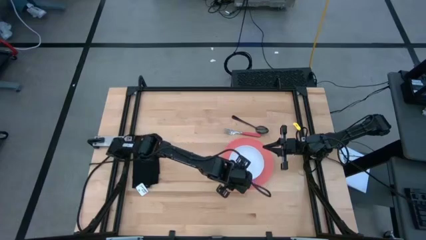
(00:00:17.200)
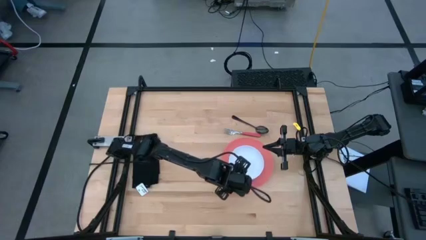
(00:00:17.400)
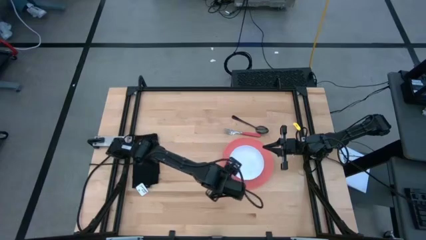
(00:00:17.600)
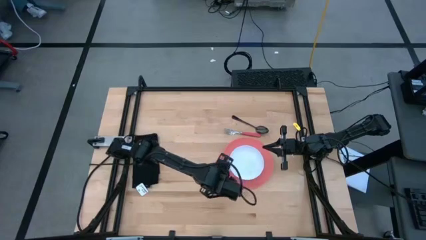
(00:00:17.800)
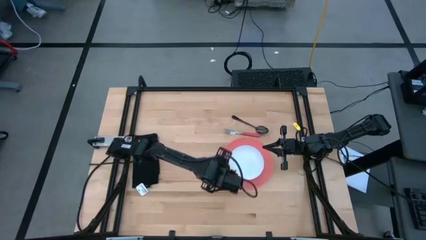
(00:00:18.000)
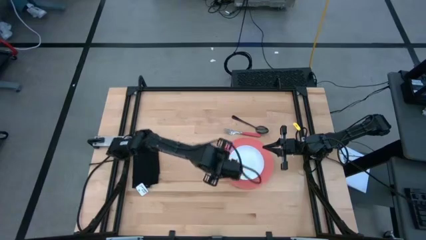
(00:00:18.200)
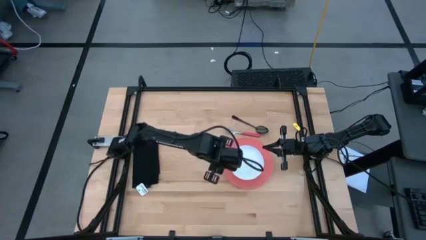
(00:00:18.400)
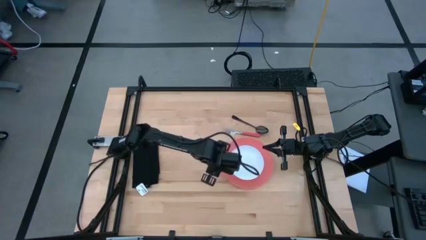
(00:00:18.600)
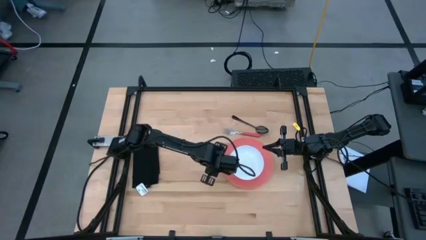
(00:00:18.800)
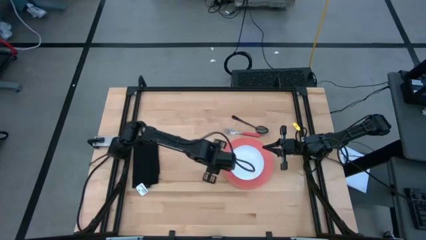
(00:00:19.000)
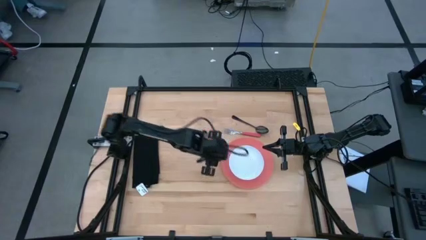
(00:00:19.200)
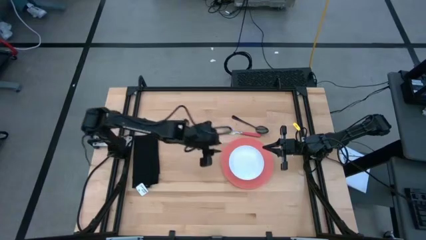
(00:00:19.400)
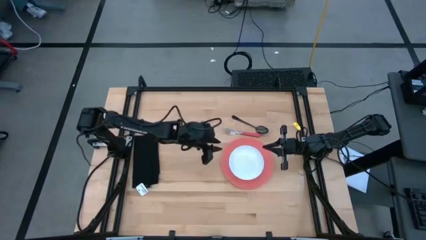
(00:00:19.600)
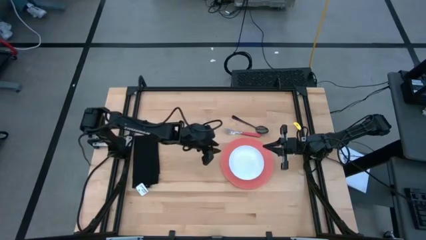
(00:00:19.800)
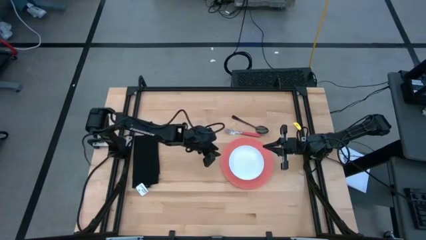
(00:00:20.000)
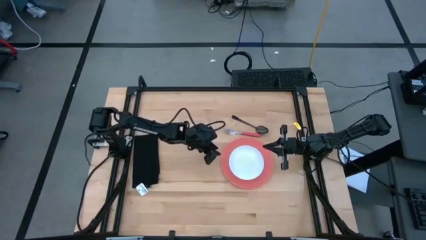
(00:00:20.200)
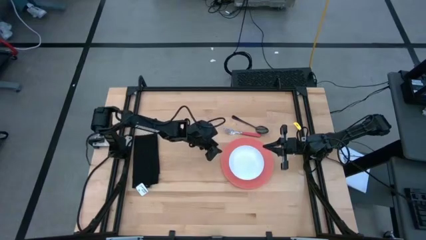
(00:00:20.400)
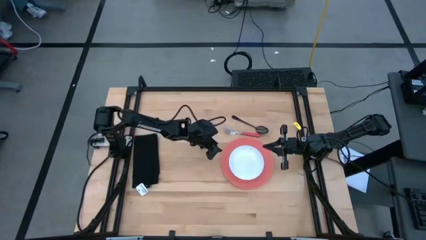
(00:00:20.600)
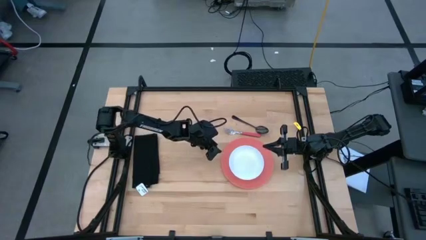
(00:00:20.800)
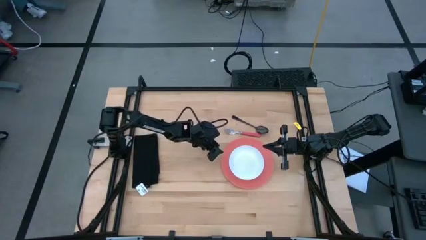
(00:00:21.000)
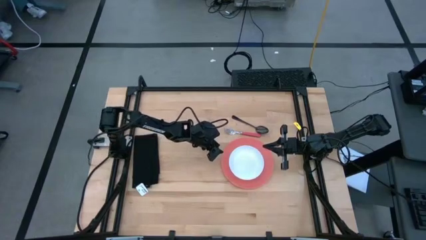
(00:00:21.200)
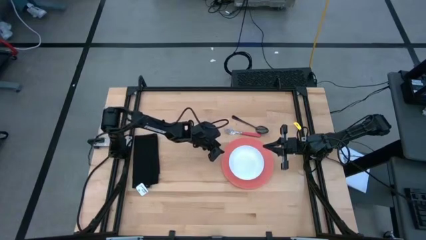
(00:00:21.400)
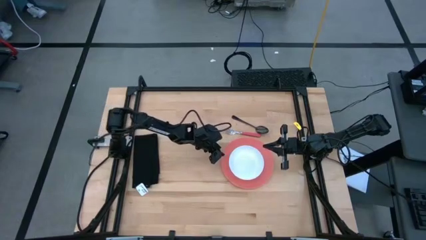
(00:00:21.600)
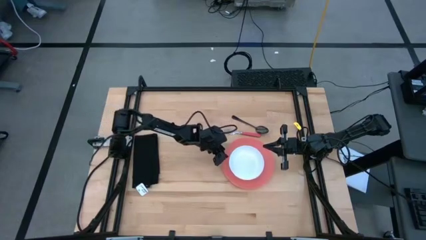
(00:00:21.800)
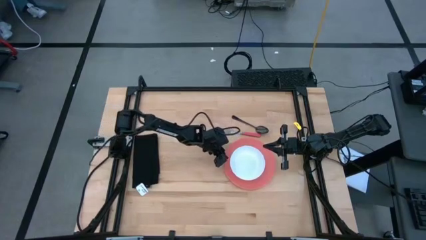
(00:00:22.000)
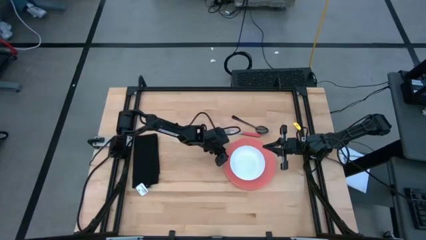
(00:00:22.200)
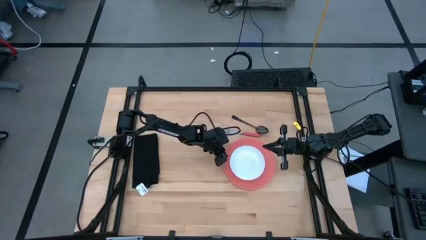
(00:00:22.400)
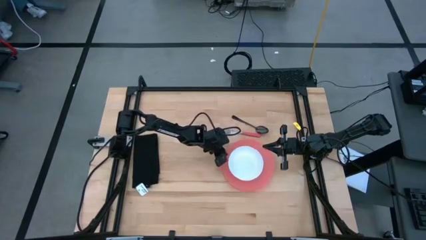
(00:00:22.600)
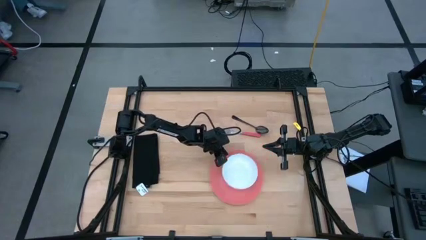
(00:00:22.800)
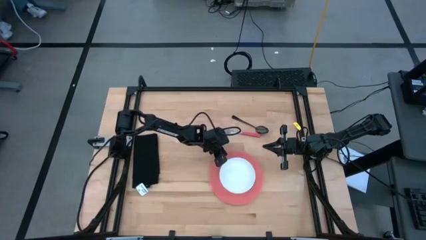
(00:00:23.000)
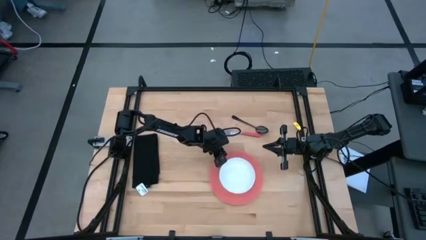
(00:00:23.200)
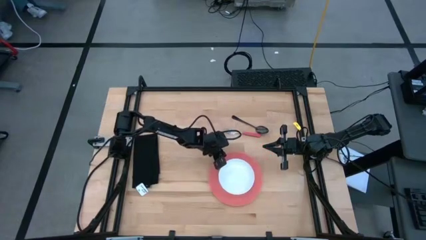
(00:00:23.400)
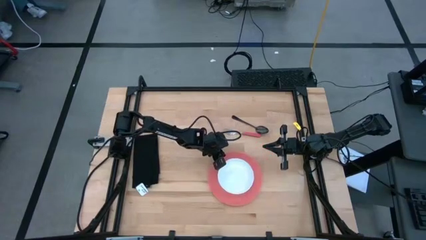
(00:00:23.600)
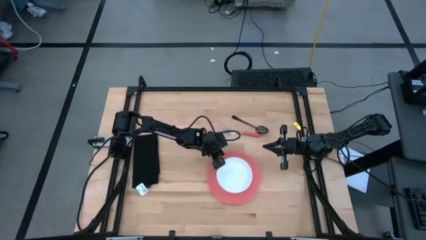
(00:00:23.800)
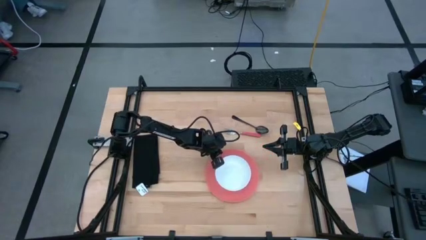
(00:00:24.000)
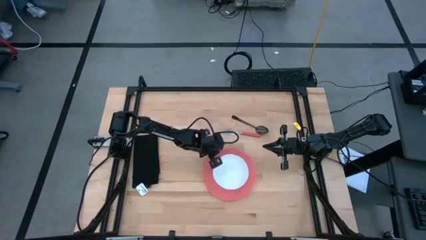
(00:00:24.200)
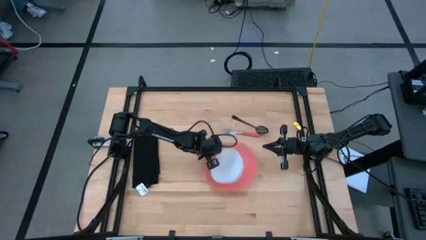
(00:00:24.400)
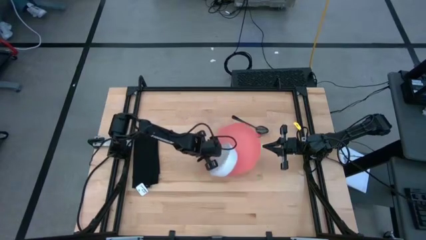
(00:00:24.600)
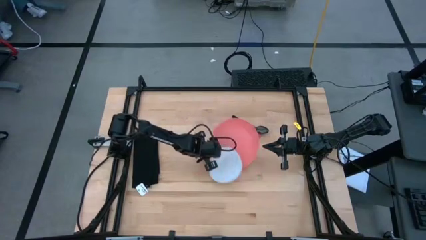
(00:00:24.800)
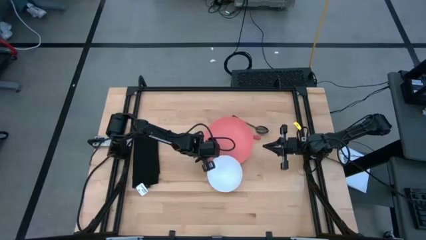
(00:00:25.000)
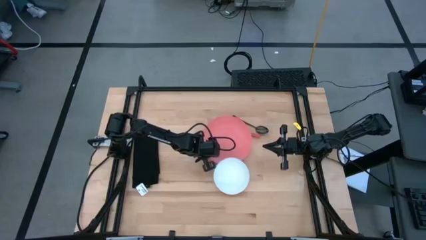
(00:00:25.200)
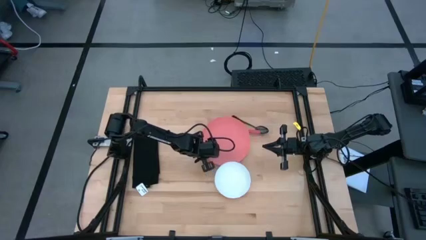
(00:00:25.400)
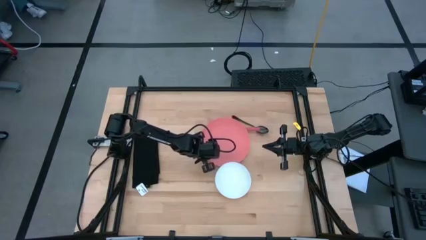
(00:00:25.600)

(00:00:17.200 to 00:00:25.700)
Task: Set table place
Adjust the pink plate

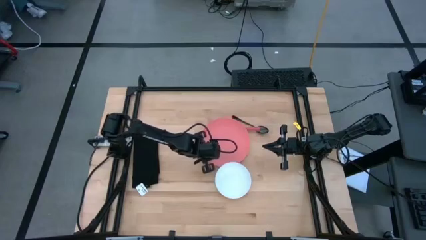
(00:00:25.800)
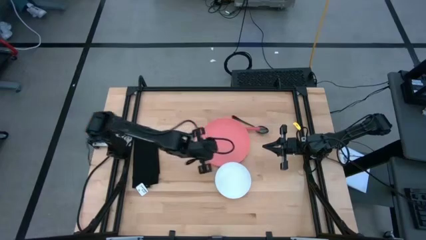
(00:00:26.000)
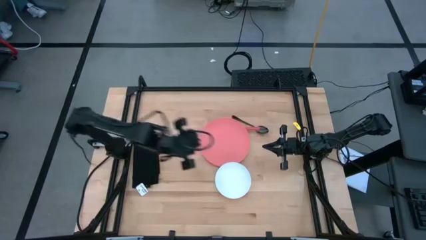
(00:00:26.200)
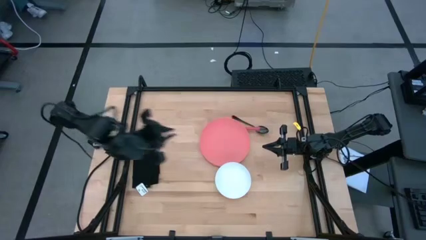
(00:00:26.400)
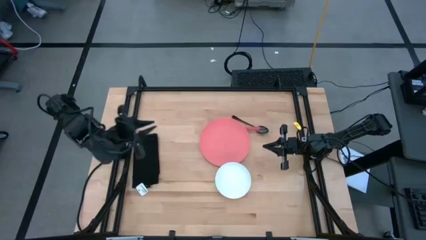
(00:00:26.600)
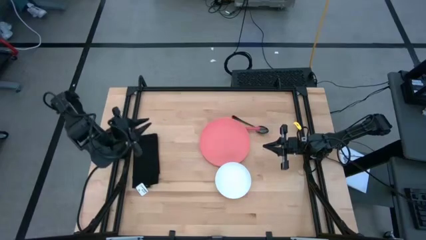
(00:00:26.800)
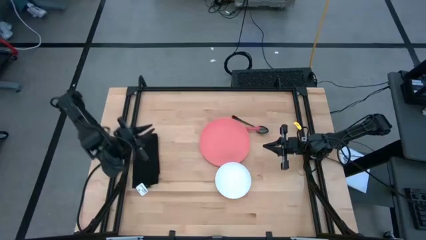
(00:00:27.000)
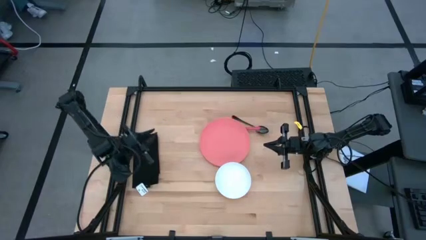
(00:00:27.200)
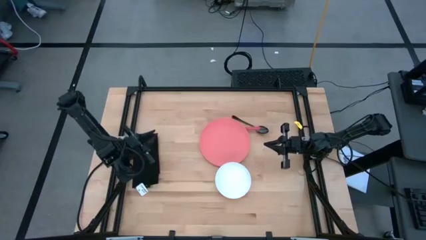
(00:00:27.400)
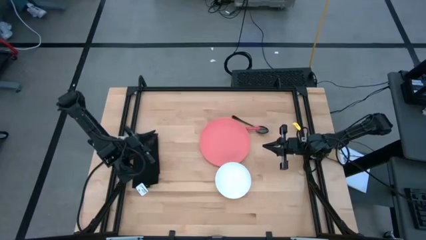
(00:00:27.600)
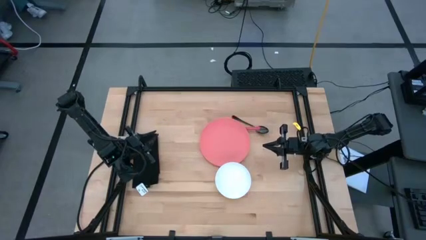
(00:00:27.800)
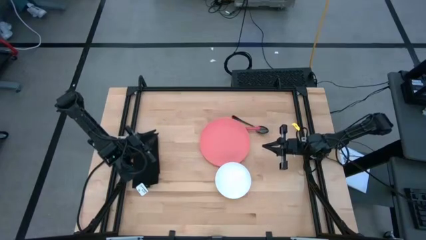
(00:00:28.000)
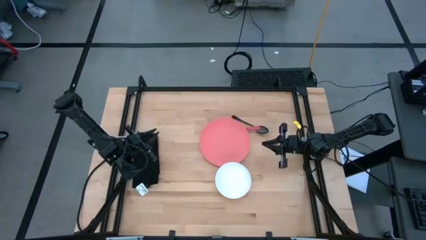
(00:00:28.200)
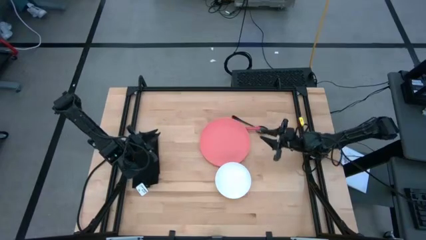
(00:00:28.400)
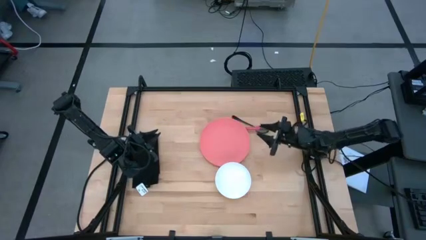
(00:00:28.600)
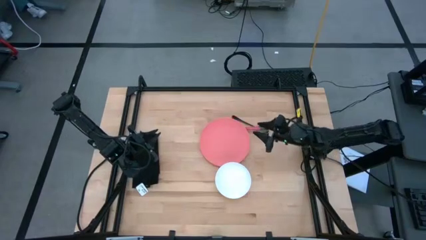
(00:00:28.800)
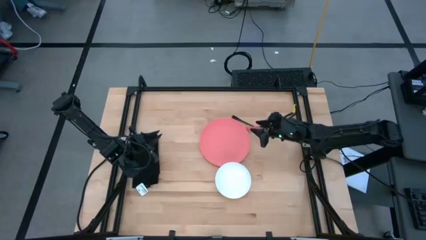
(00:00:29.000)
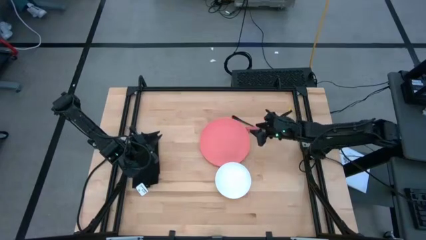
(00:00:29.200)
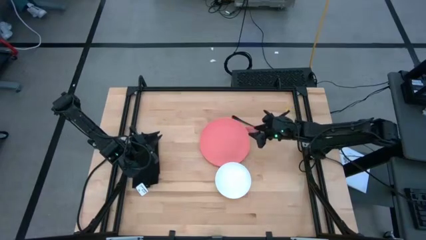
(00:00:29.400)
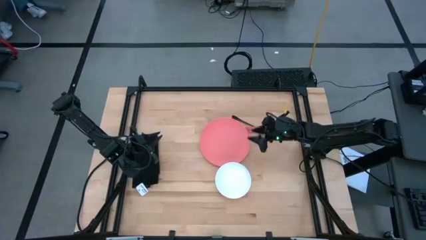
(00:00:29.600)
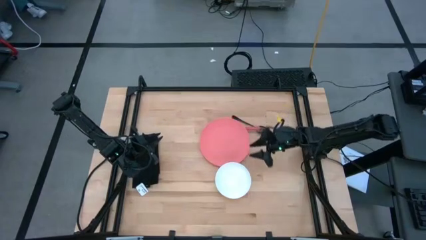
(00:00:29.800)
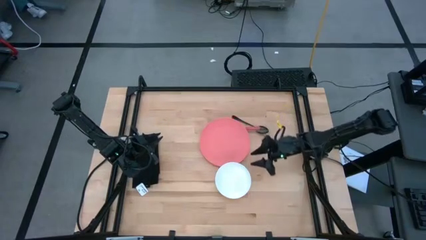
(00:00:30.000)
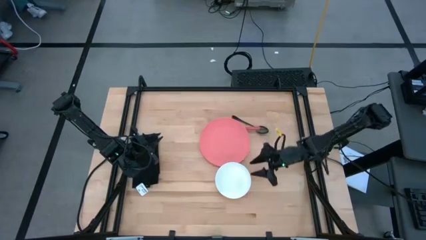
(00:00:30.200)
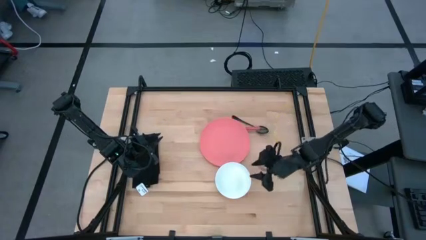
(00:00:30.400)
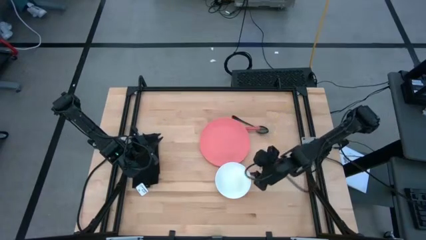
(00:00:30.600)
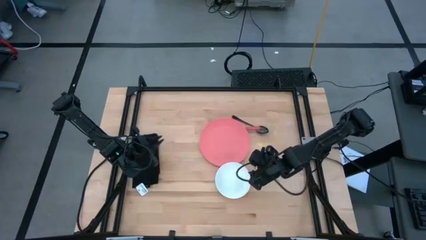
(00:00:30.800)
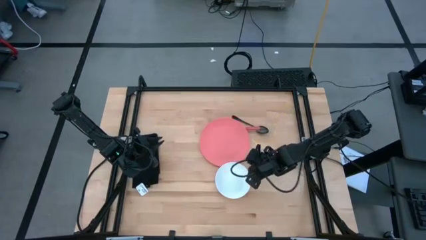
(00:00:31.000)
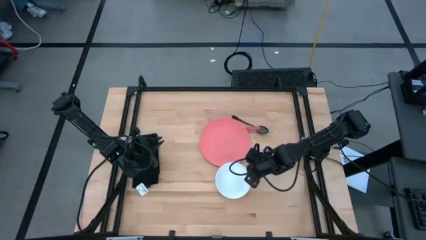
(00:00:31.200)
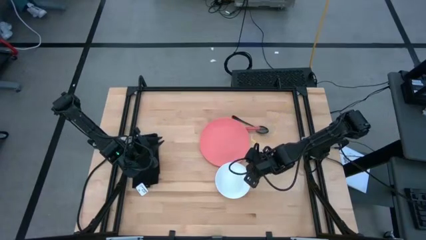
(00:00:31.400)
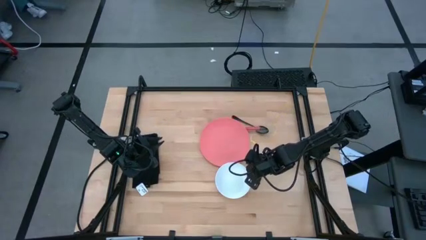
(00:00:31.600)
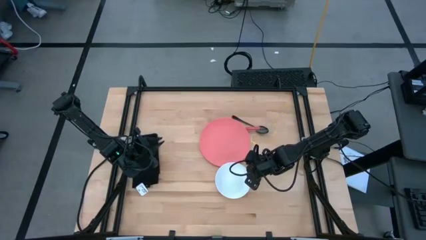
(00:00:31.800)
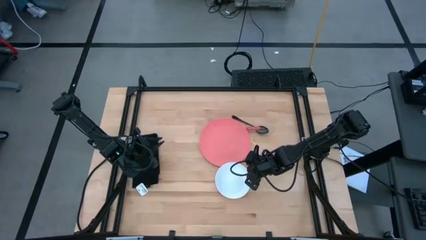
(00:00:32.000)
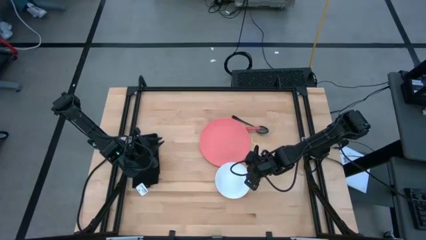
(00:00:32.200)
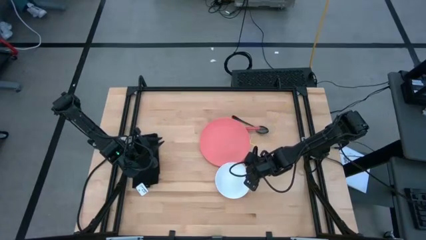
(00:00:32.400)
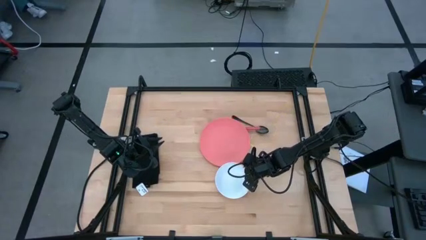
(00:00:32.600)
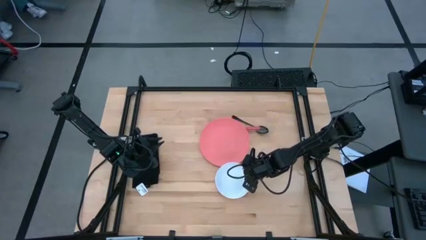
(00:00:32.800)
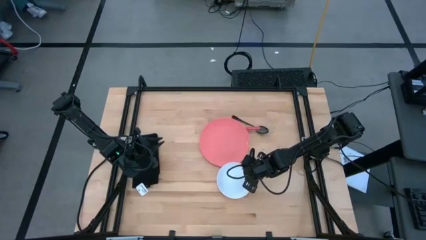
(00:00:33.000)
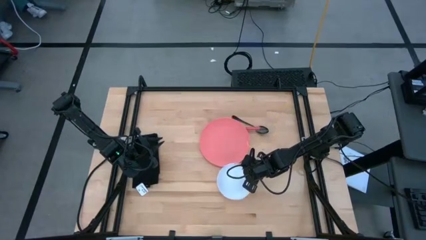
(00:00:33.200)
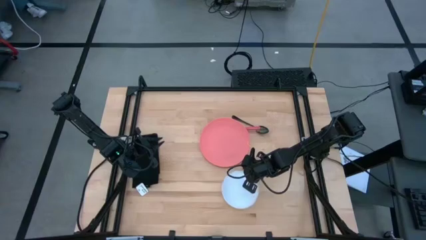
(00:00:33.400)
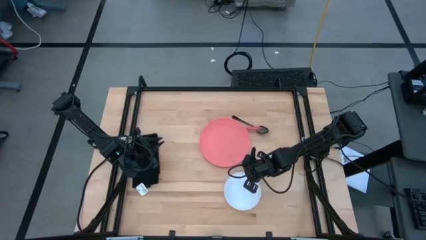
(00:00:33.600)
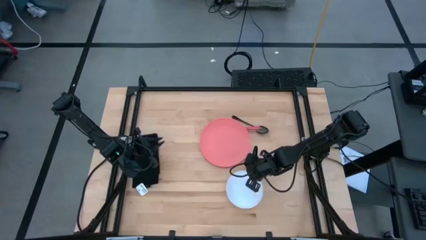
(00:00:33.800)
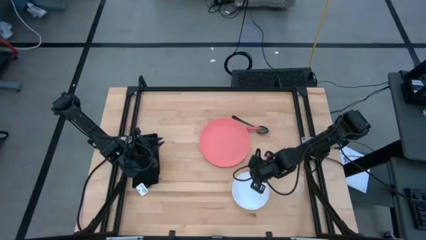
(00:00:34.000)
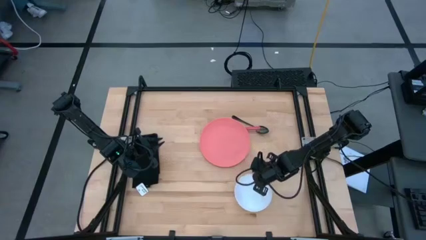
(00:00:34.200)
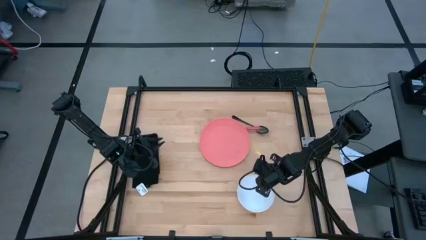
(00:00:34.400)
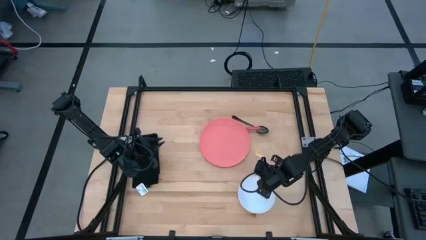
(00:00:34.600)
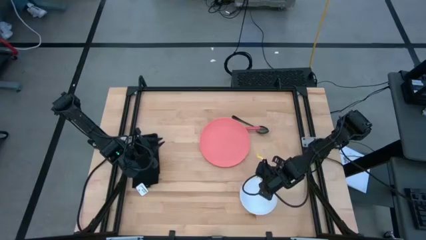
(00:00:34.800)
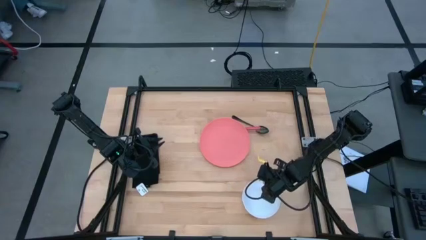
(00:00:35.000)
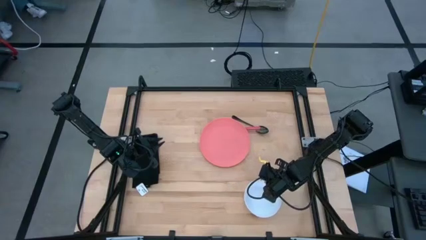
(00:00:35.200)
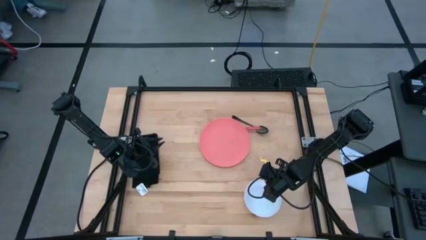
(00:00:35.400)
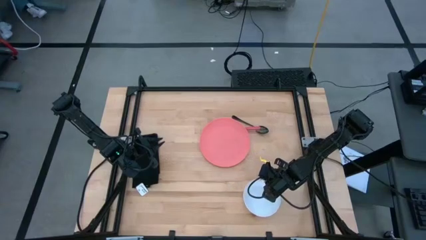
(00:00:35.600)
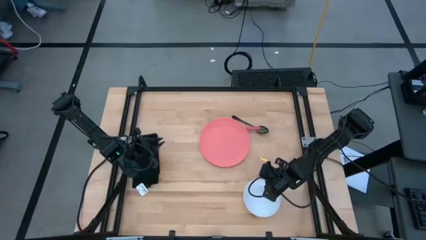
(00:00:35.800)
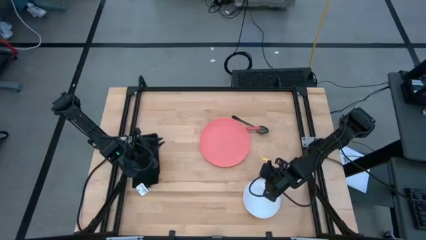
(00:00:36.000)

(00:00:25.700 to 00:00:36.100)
Adjust the white bowl
